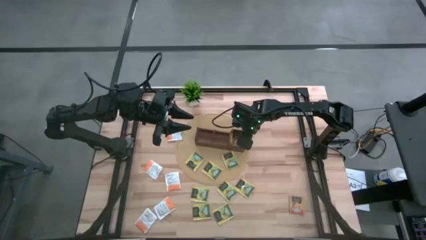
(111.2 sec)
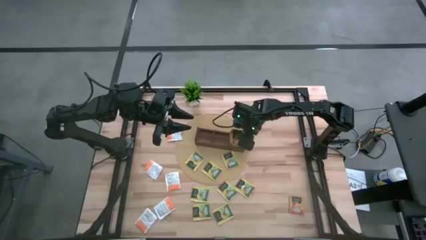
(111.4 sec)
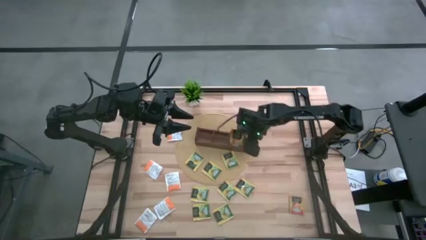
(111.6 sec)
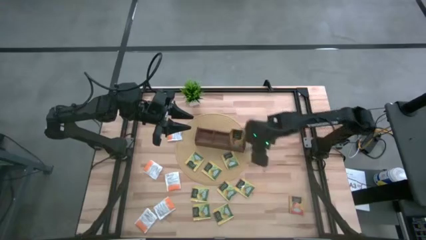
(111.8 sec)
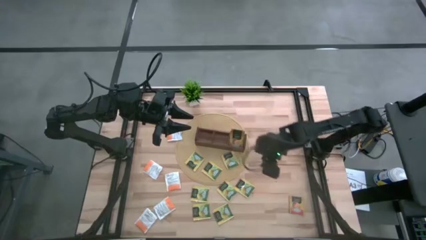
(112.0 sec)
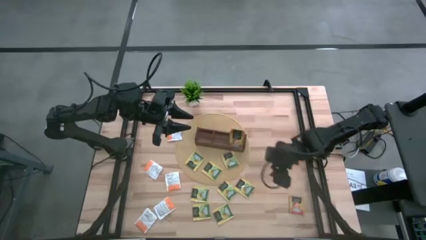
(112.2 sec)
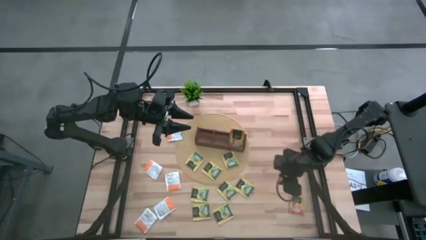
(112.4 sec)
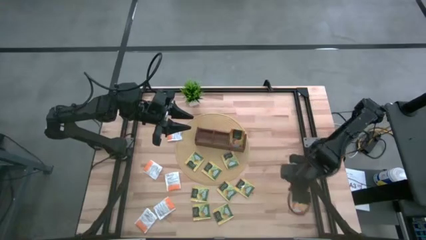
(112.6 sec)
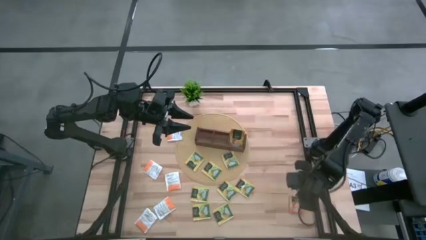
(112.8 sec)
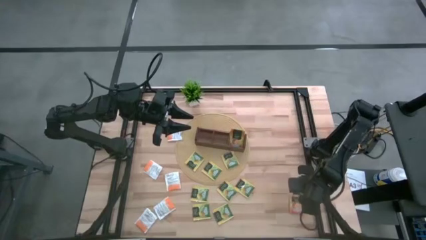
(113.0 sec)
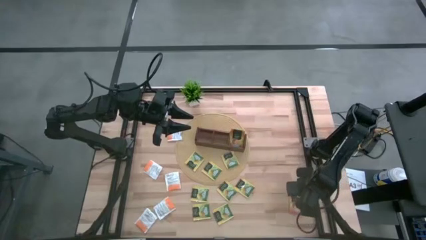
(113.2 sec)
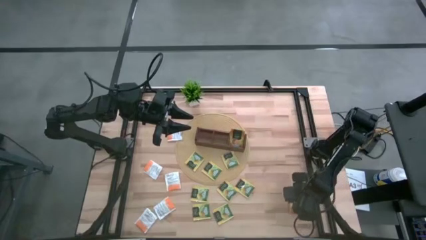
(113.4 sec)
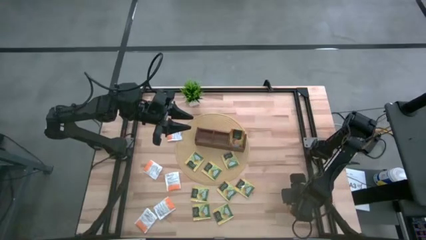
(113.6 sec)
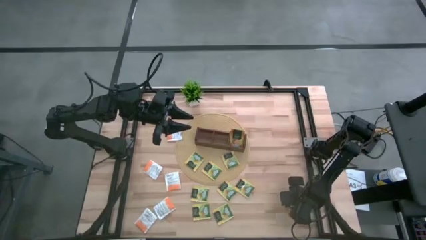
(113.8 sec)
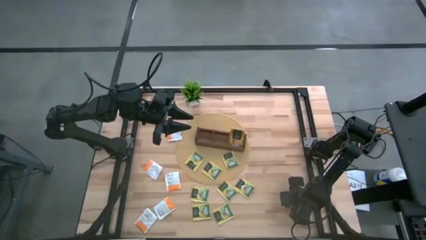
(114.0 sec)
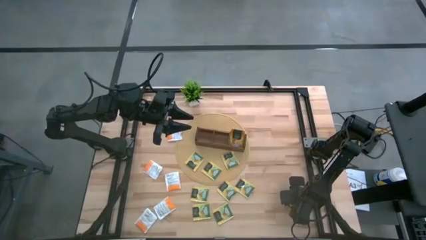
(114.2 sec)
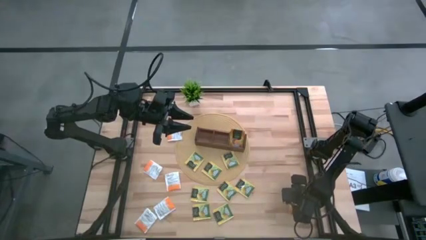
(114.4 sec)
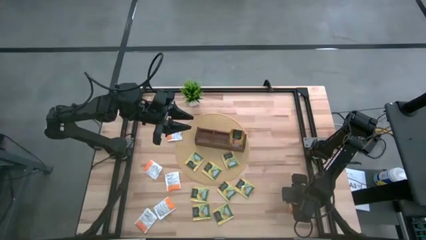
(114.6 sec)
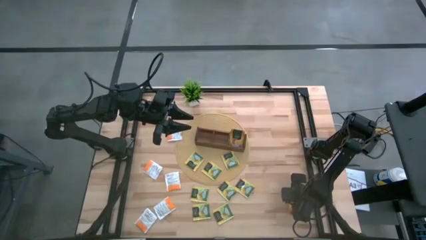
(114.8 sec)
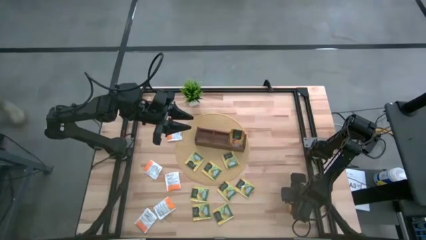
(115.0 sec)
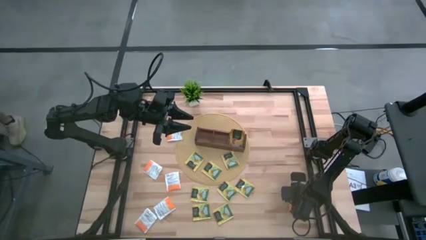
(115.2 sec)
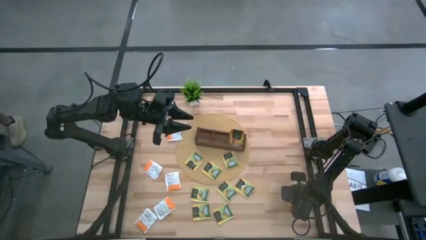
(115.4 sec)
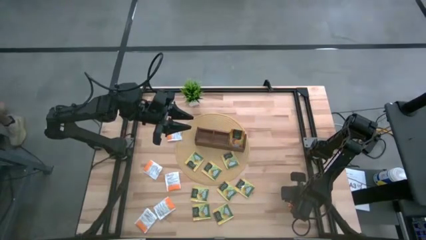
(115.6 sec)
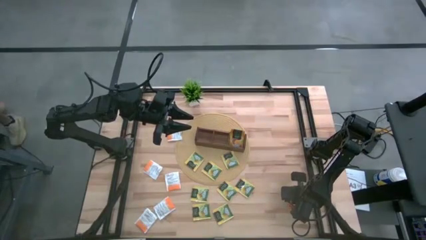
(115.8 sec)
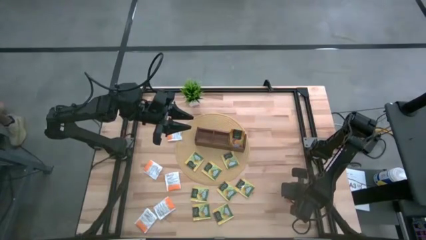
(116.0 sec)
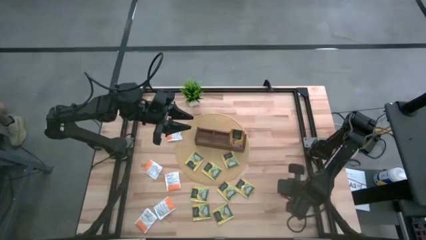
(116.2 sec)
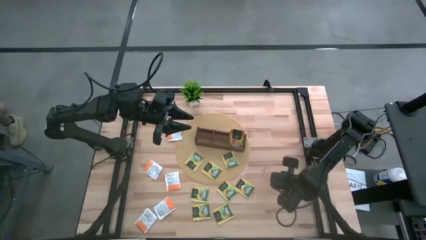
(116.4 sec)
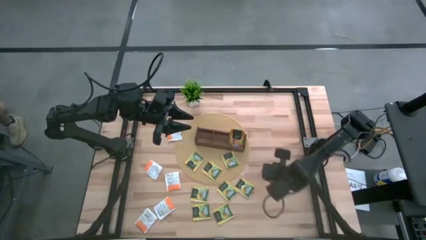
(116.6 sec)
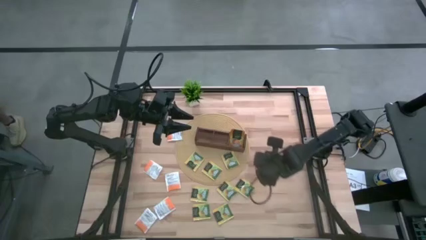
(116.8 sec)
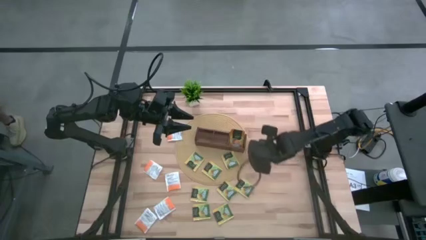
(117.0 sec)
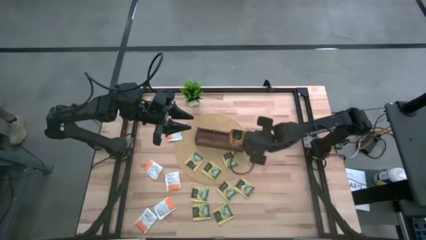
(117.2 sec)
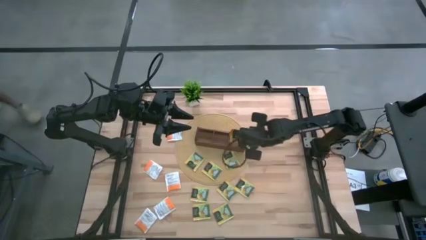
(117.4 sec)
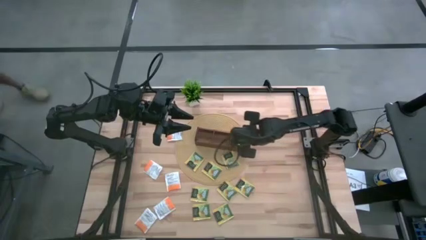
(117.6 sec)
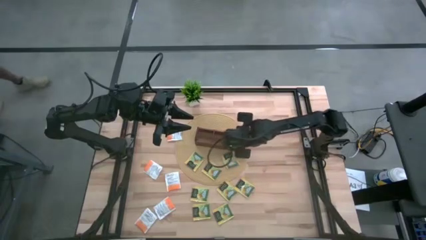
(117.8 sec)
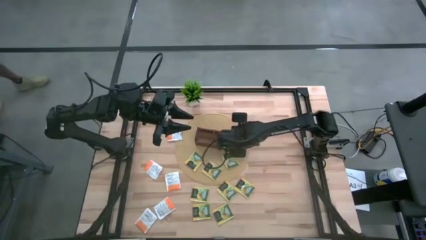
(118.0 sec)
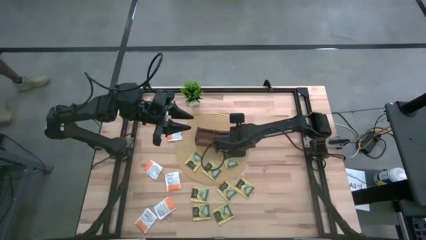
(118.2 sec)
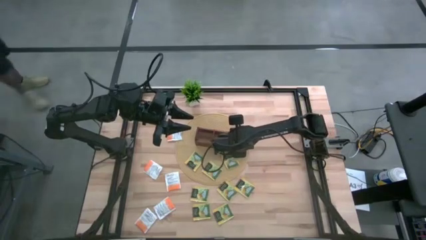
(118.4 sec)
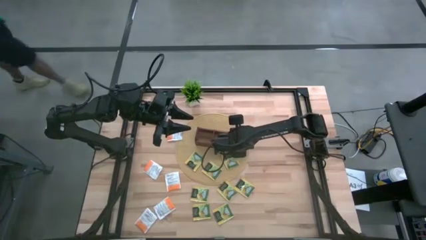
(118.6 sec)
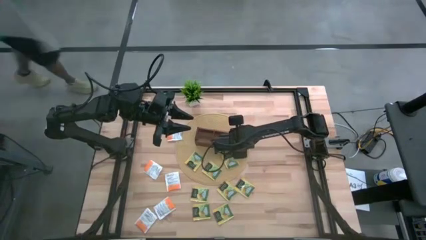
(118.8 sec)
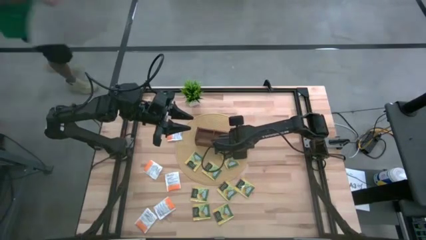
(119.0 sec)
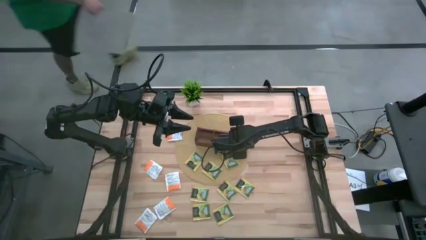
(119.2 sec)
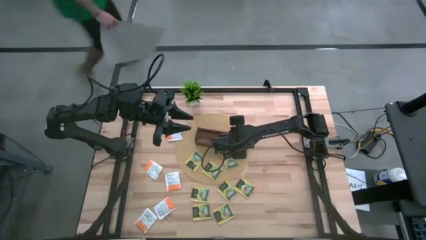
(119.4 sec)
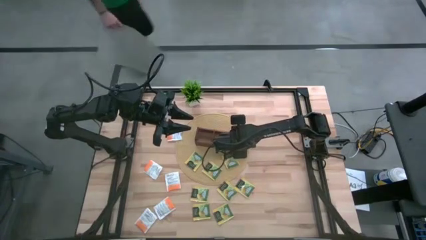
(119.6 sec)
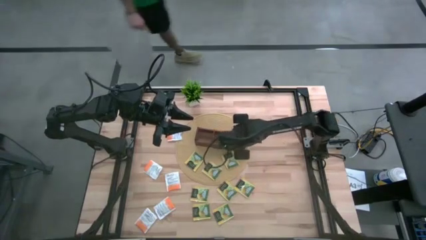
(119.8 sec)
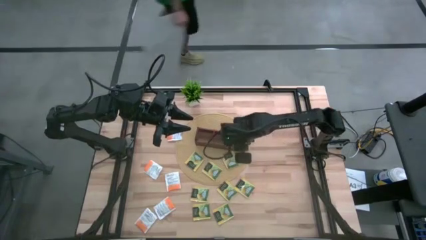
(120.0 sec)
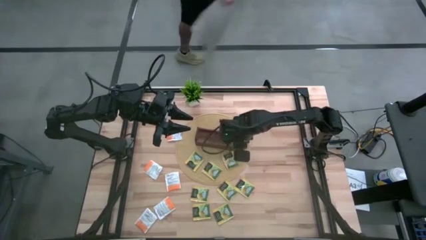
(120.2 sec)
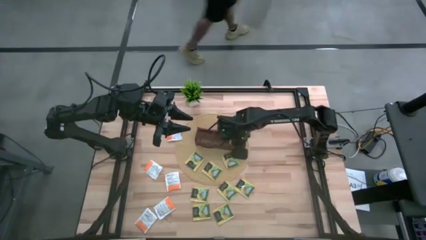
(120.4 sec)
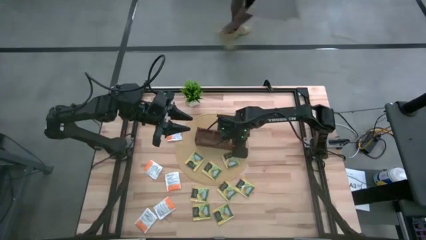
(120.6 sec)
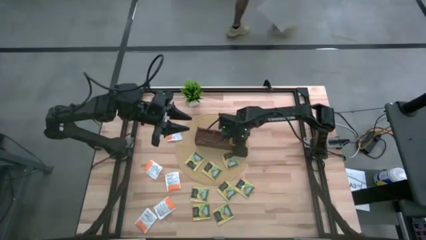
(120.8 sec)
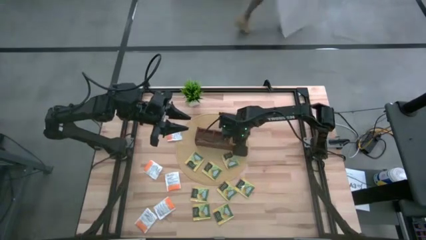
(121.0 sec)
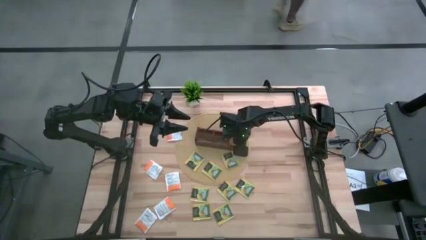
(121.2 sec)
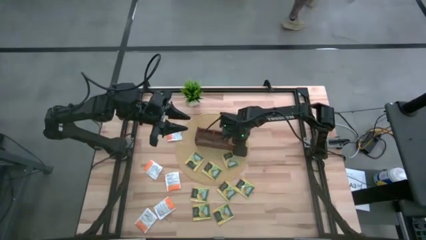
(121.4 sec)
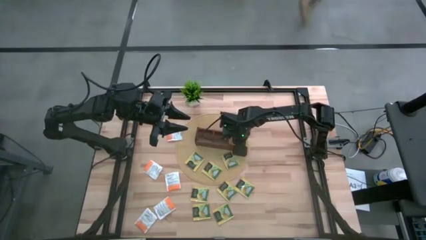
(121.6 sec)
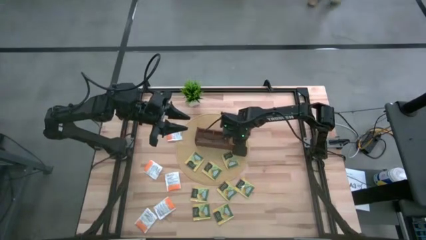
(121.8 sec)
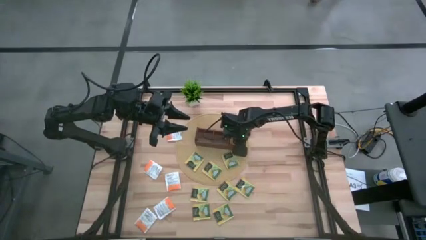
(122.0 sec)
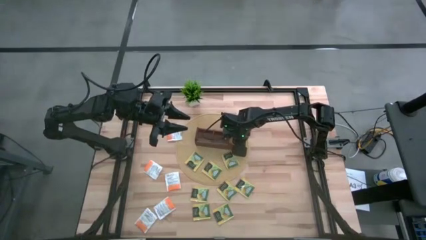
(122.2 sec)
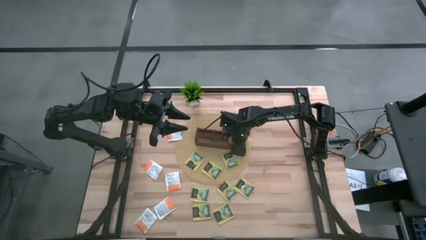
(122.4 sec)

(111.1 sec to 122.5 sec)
Task: Pick & Place Tea
Put the orange tea bag into the right section of the wooden organizer

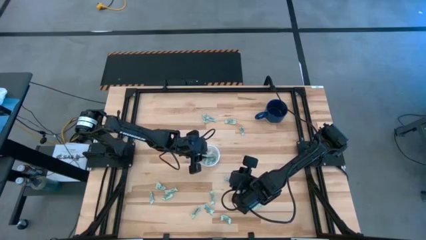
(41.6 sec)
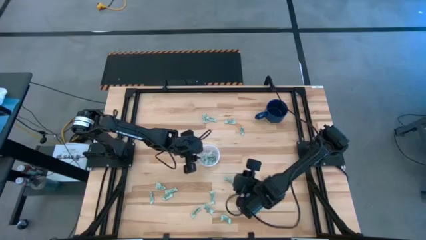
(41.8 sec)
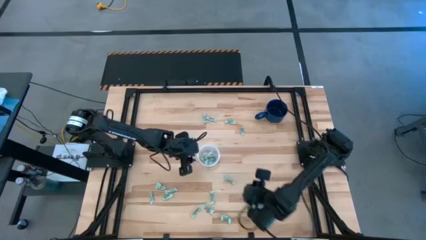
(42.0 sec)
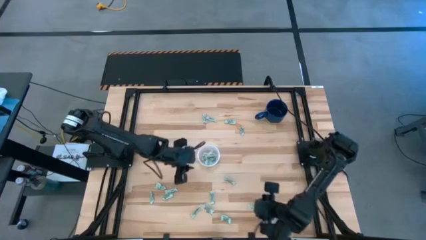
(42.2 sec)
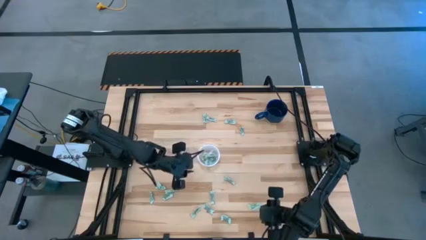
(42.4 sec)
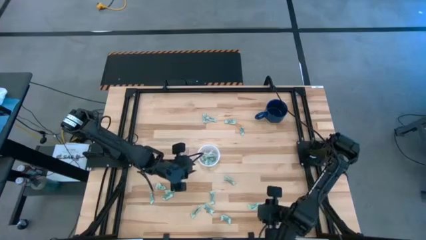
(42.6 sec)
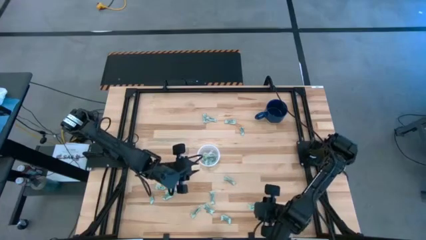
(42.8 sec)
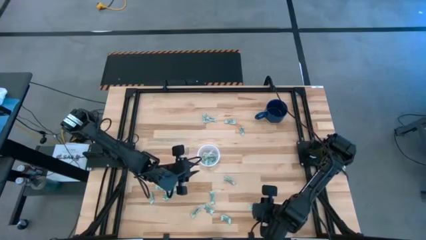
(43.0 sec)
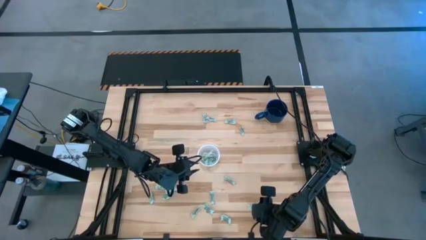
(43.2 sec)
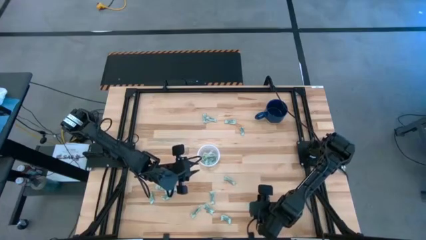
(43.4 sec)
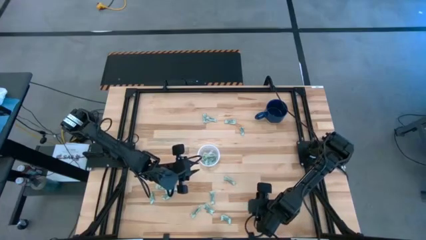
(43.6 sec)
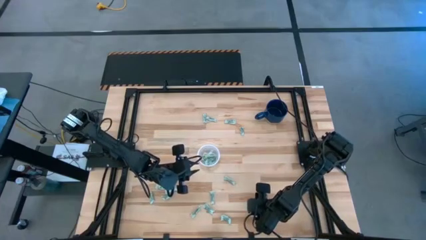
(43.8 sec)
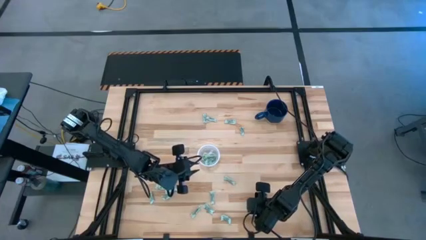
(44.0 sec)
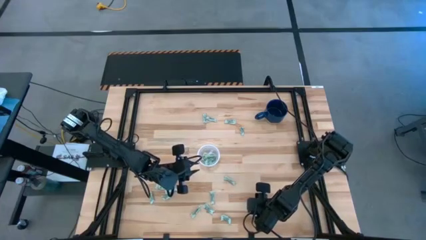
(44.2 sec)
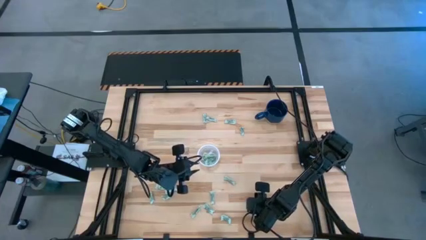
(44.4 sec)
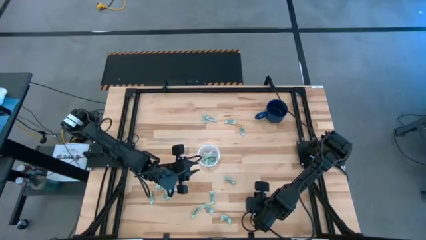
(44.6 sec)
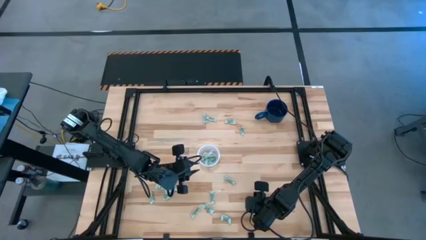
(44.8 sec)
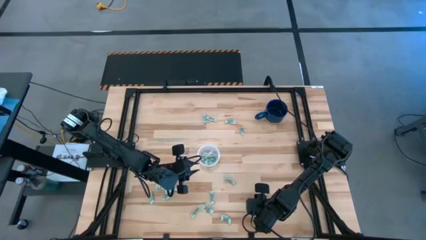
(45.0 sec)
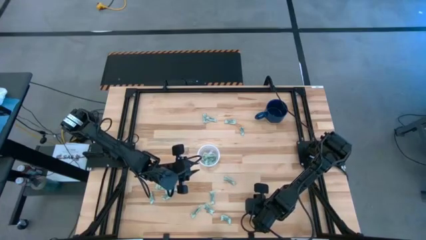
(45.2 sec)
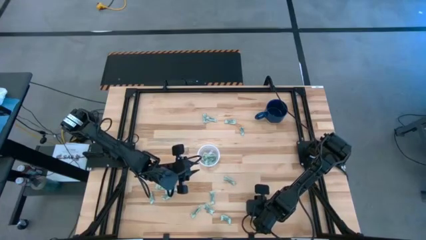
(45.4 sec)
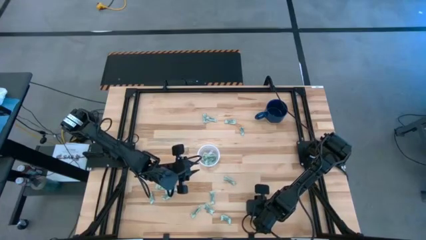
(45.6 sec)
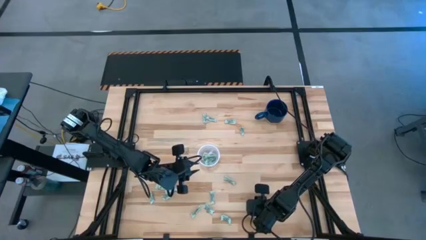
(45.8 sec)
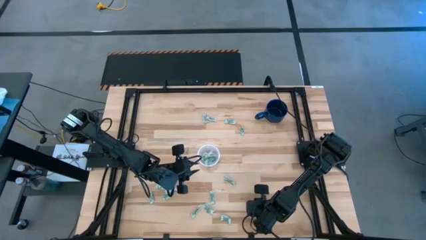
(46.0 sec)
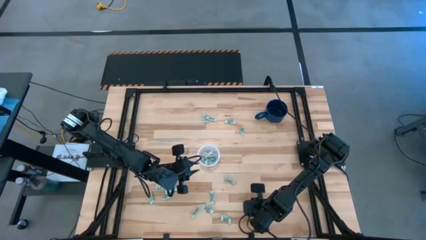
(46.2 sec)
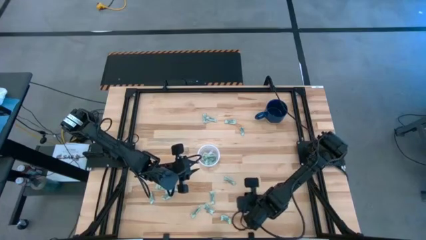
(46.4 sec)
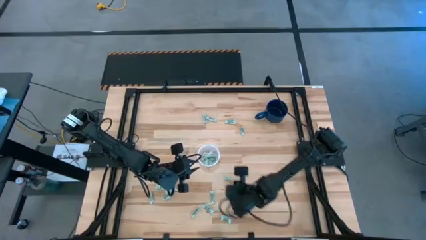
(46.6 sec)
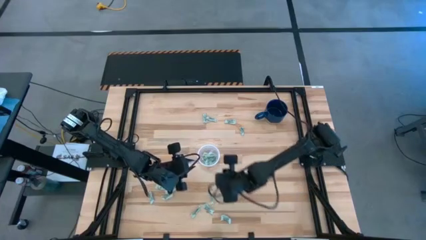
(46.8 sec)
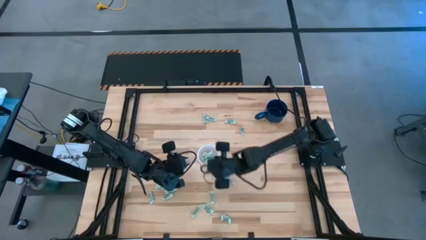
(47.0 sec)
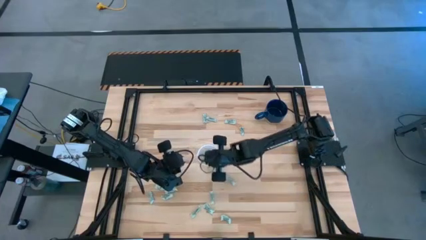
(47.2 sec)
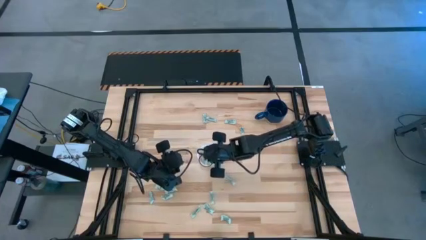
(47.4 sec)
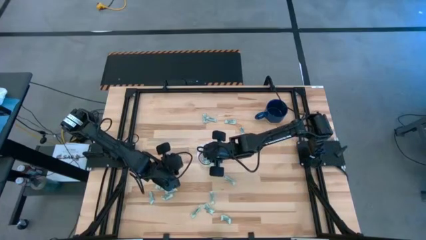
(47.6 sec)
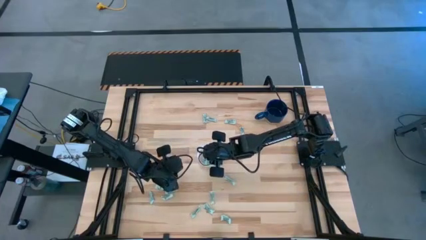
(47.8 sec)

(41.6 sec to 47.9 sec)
Task: Pick and place items into bin
Put the stevia packet into the transparent bin
